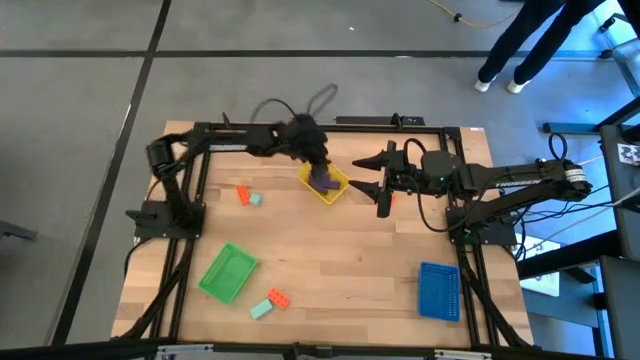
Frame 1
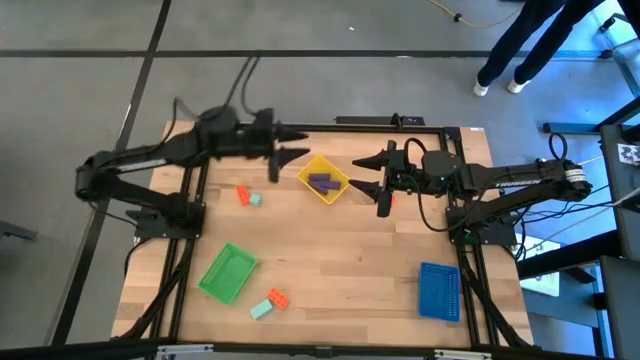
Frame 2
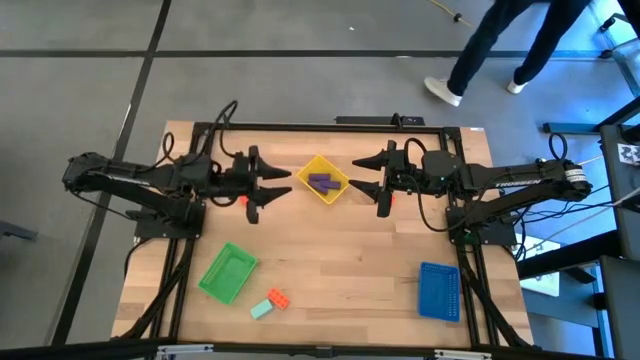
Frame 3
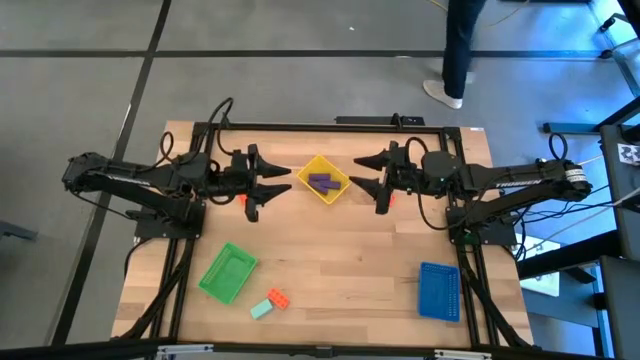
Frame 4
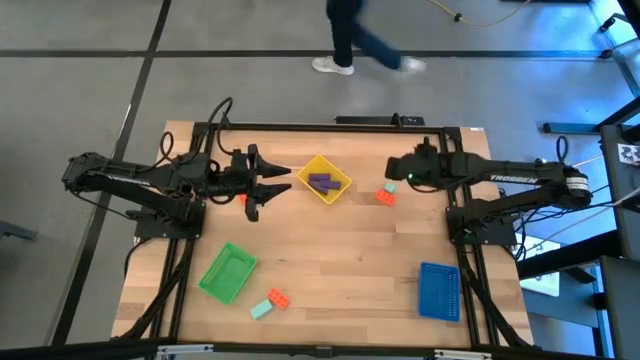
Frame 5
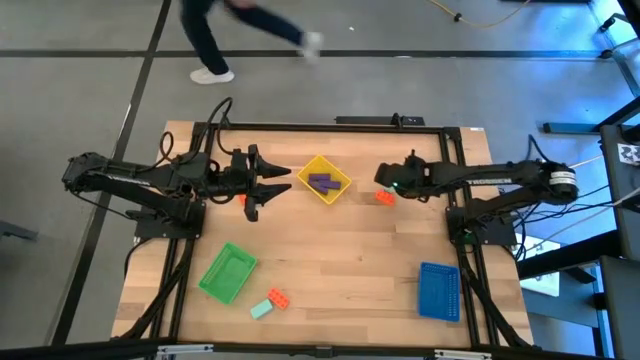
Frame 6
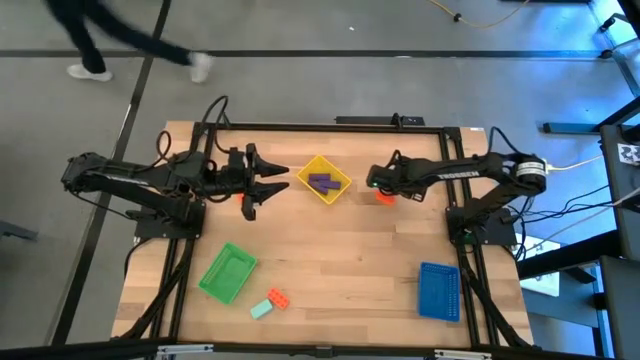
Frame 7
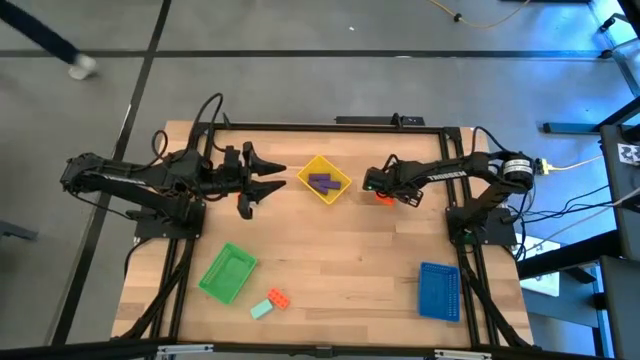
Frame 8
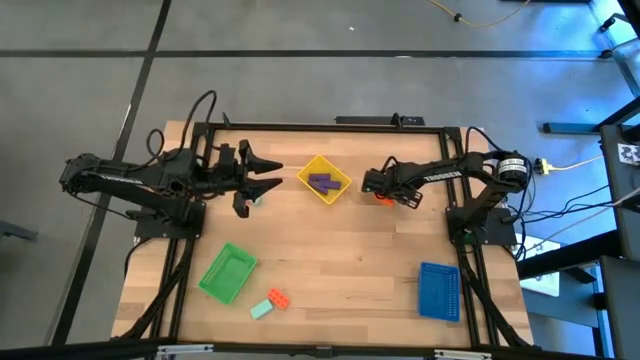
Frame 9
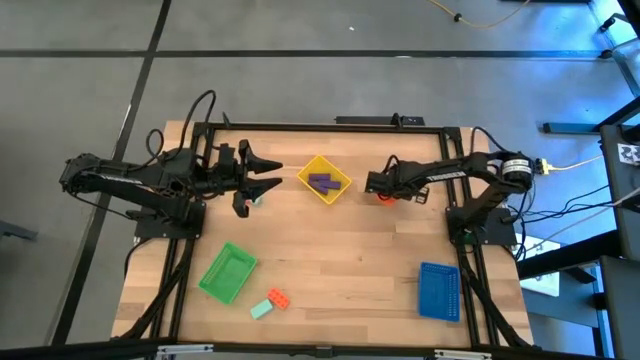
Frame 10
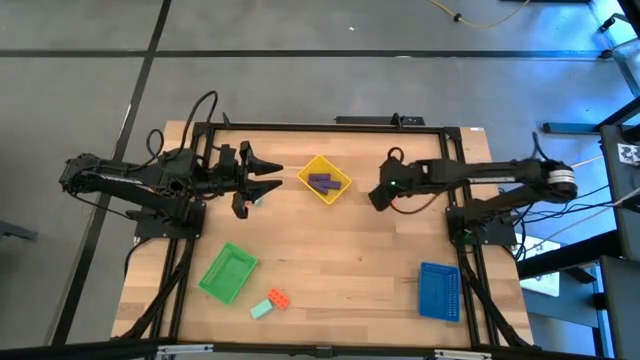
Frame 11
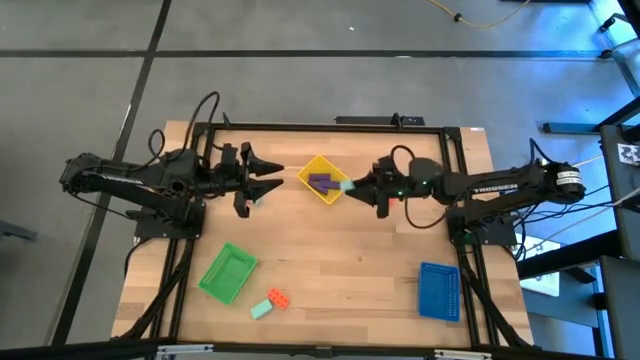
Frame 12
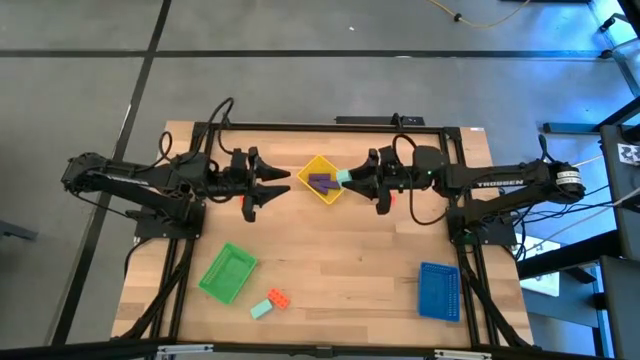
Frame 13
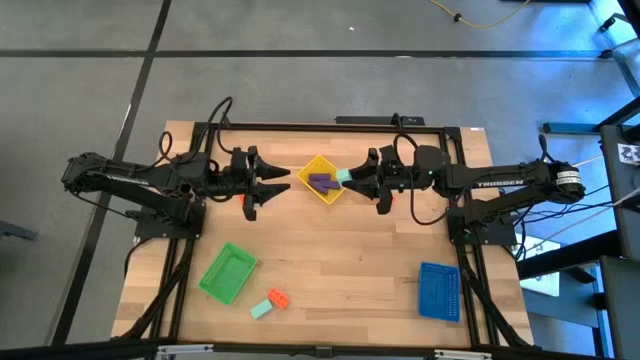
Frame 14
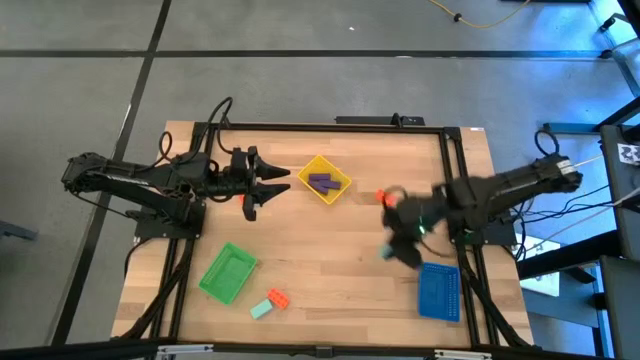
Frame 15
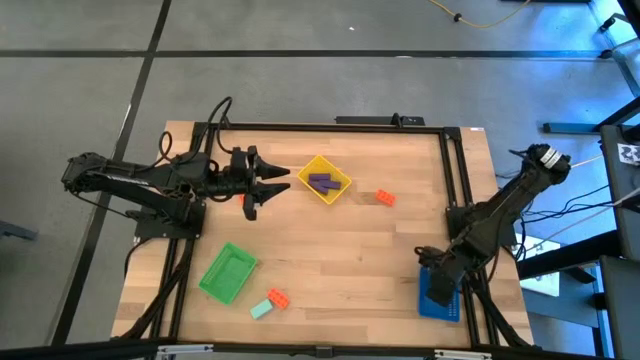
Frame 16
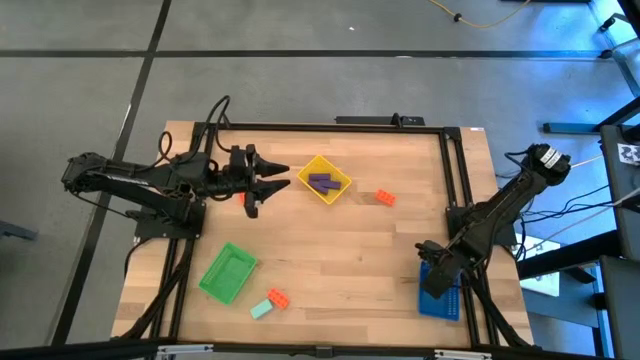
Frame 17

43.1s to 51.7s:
Task: Sort & place blocks by color
Put the top right light blue block into the blue bin

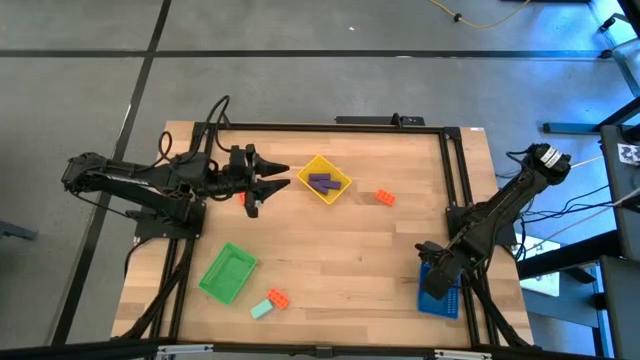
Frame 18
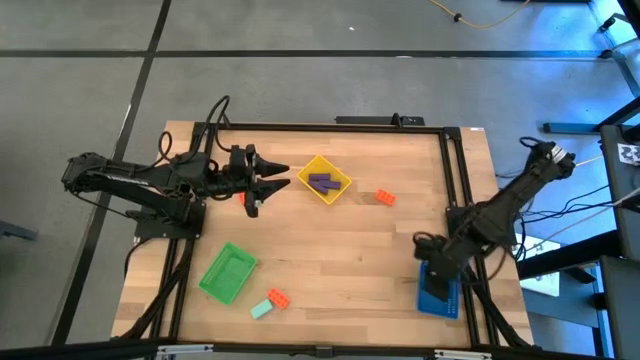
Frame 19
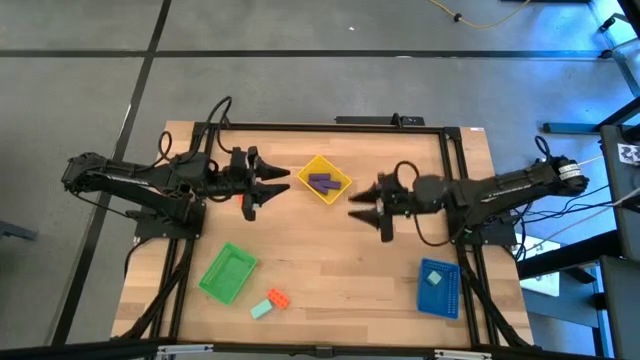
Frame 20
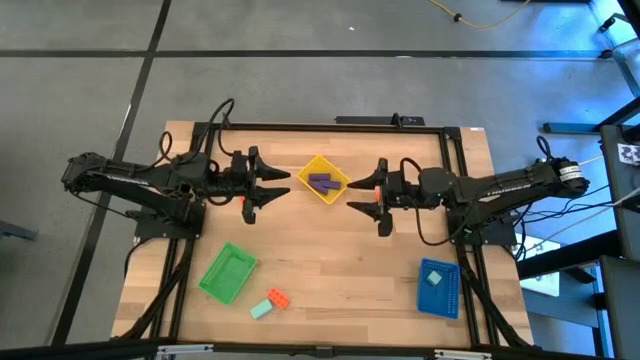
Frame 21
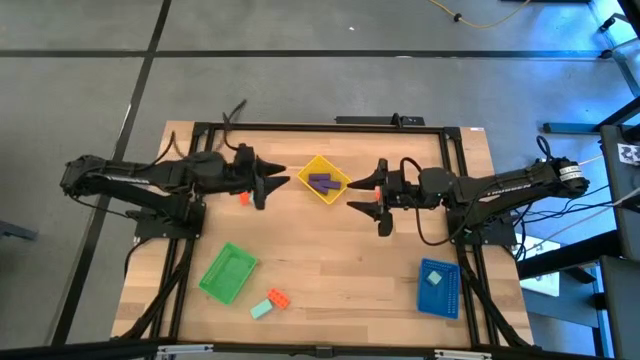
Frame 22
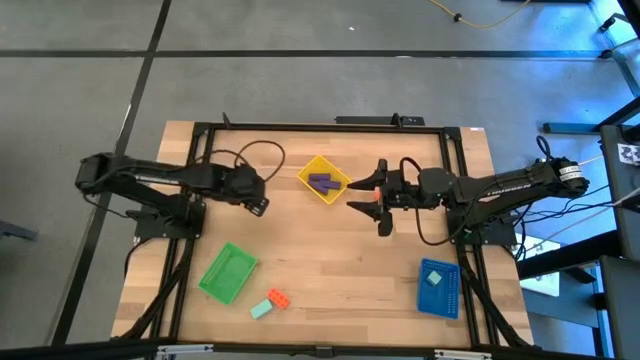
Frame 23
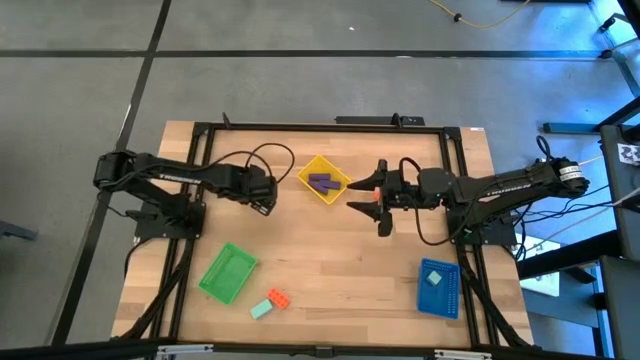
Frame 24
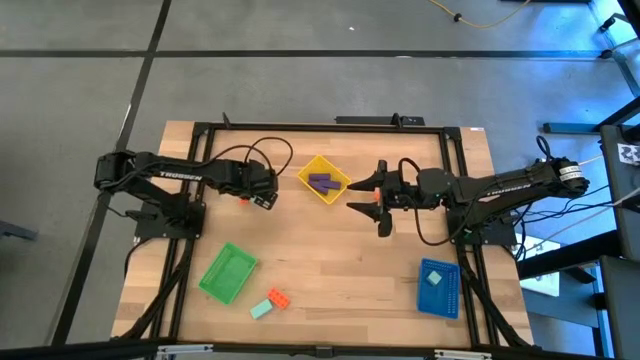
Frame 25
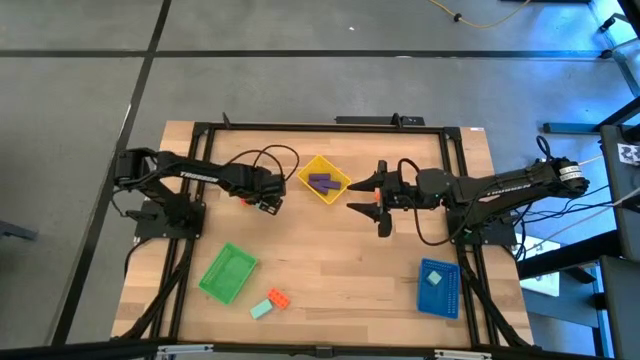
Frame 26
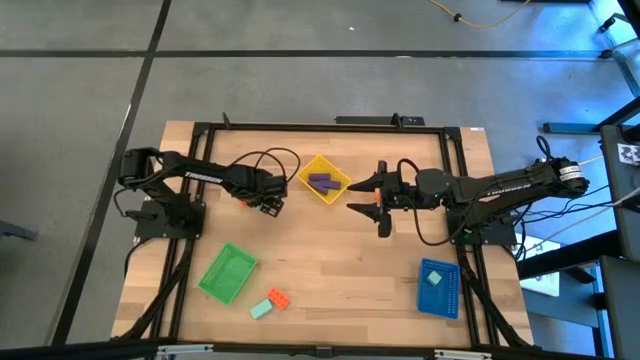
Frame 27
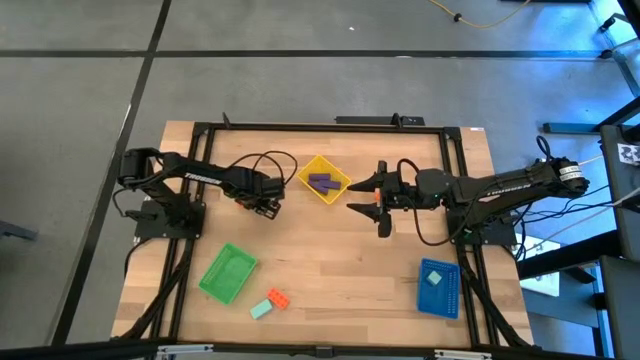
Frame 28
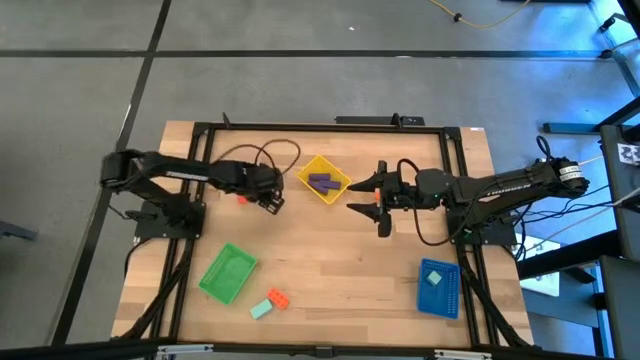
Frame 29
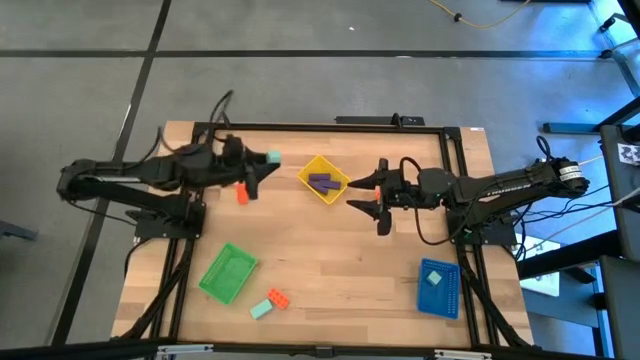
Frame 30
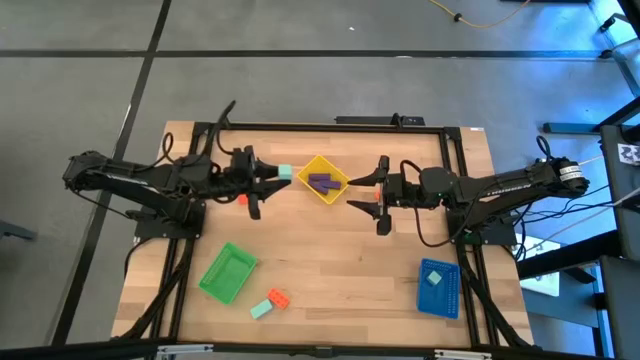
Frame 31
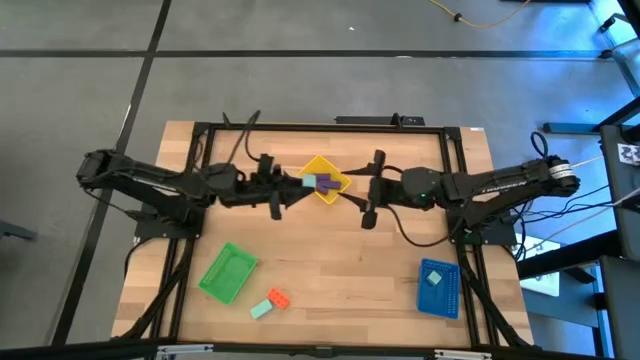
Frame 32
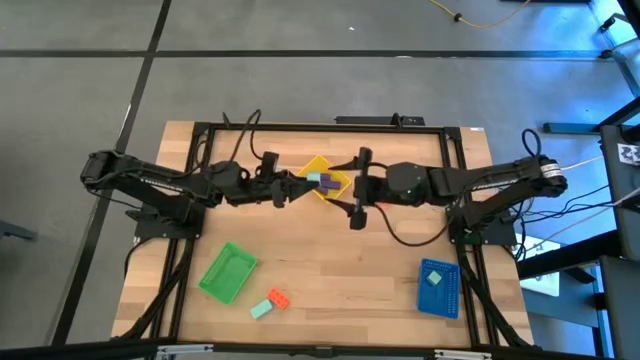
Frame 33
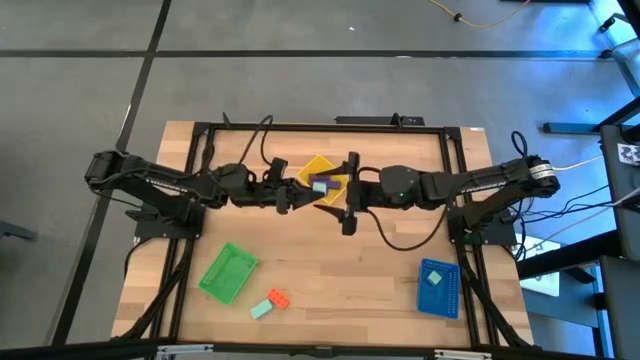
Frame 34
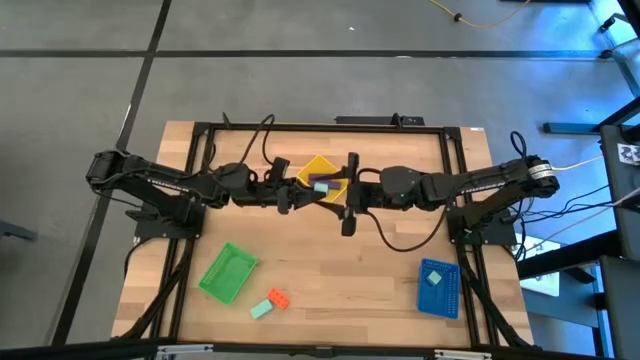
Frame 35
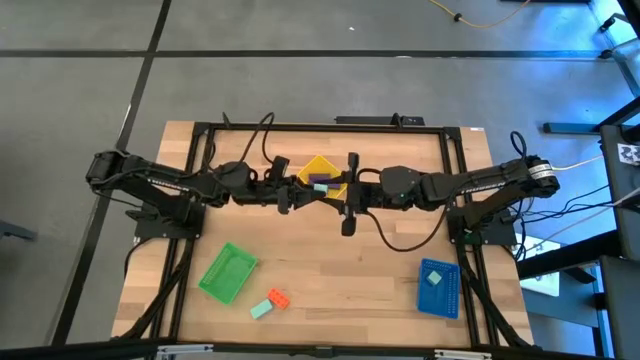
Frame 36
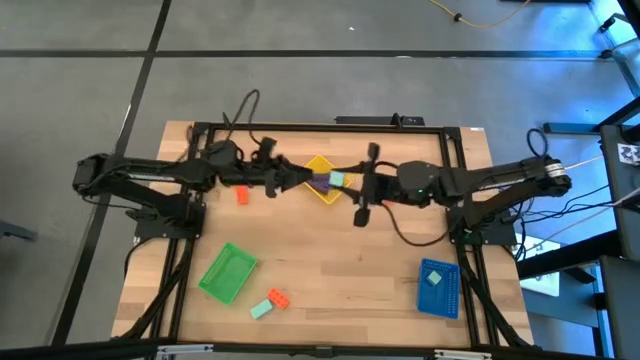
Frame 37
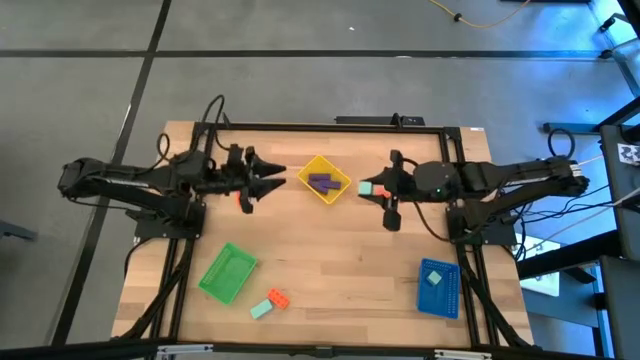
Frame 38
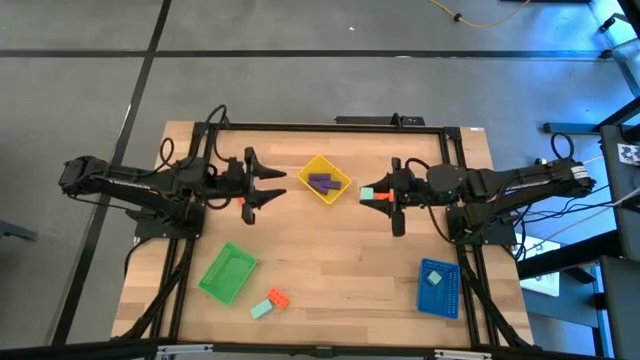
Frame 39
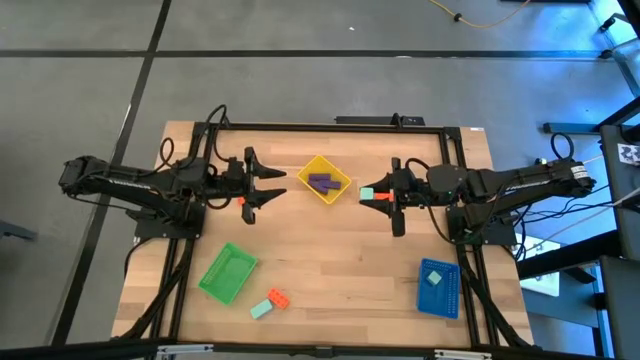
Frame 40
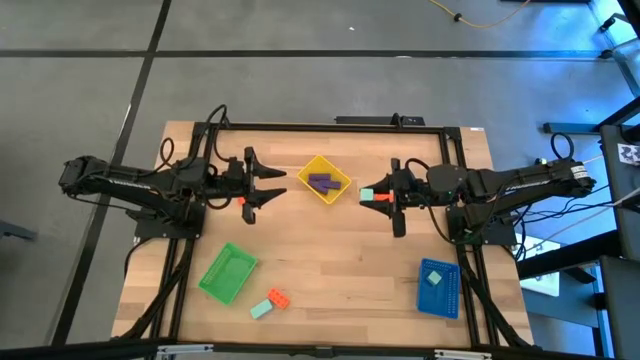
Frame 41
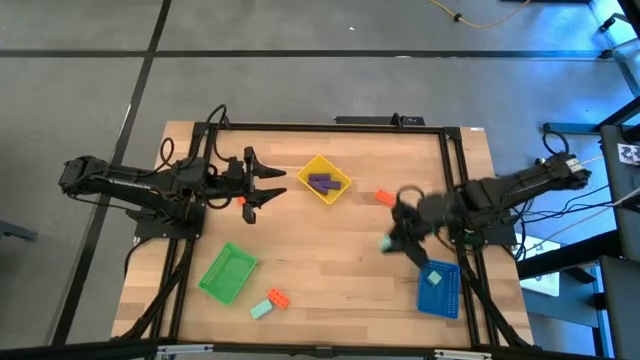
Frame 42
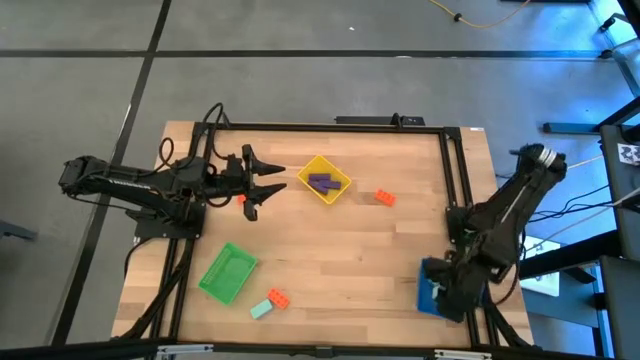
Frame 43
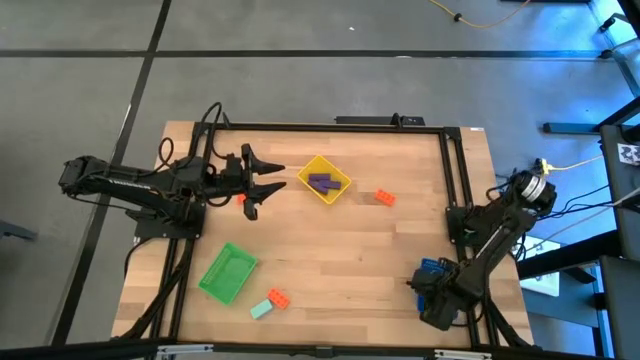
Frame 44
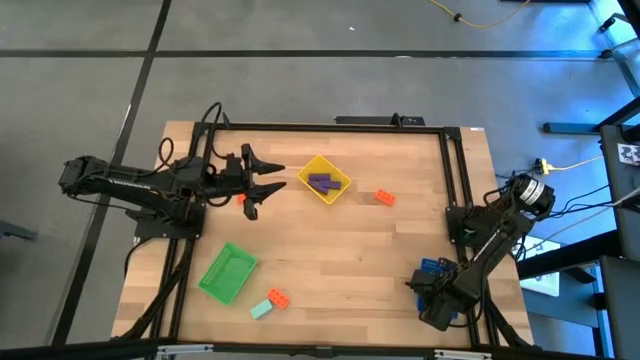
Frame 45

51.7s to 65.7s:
Put the top light blue block into the blue bin

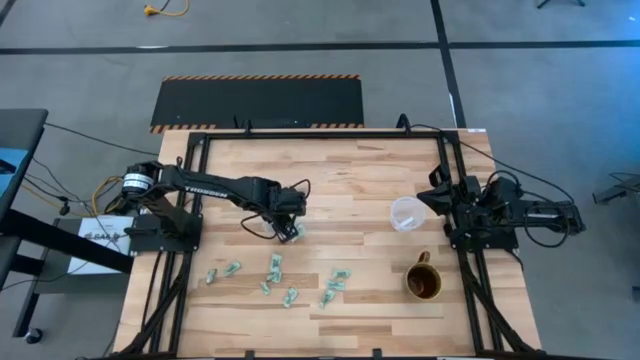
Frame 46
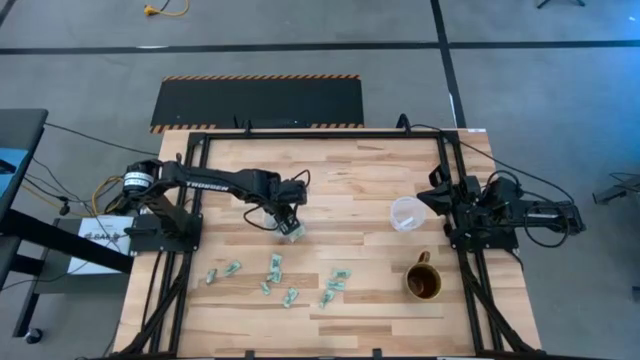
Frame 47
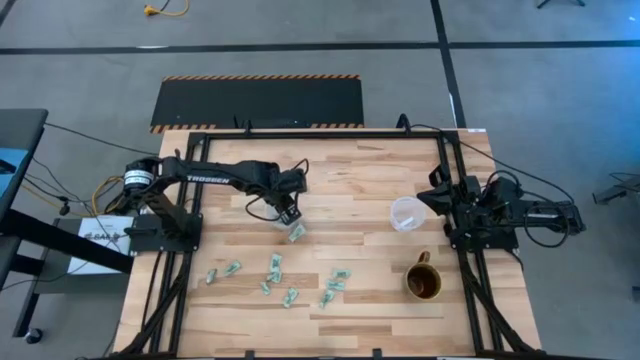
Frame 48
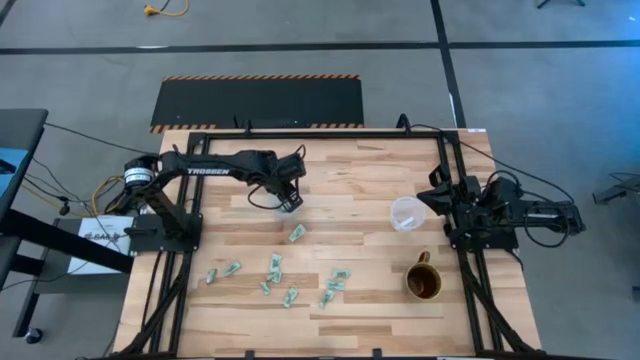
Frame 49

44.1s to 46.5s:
Task: Pick and place Stevia / Truvia into bins
Move the left transparent container to the top middle of the table
